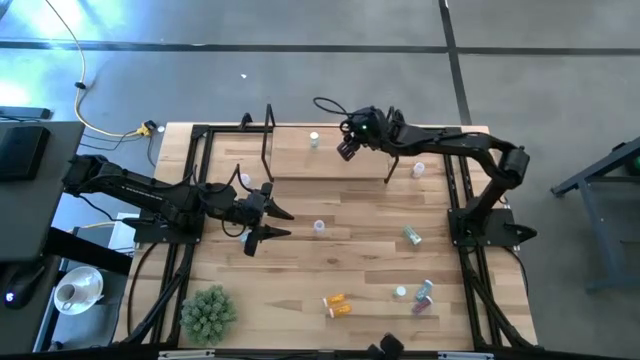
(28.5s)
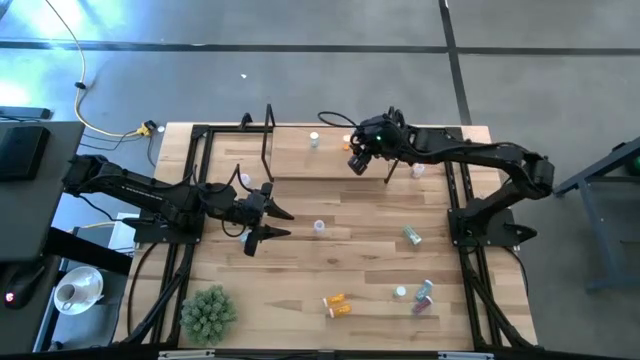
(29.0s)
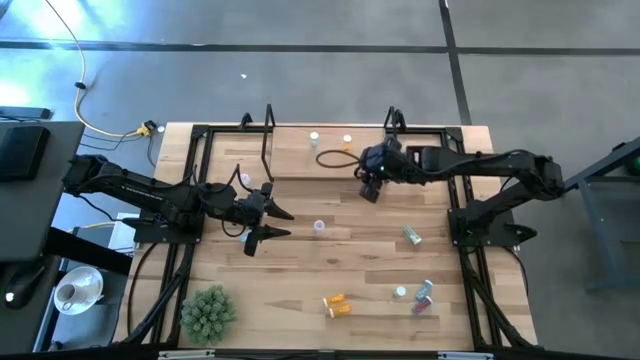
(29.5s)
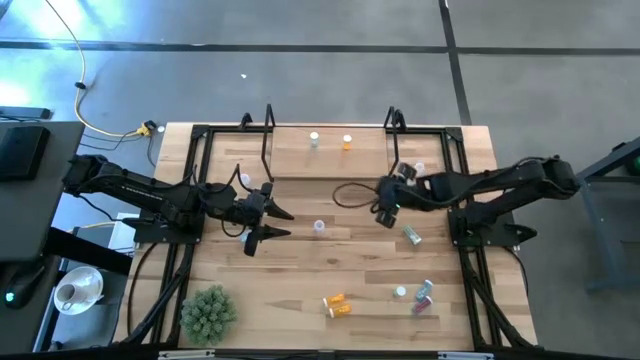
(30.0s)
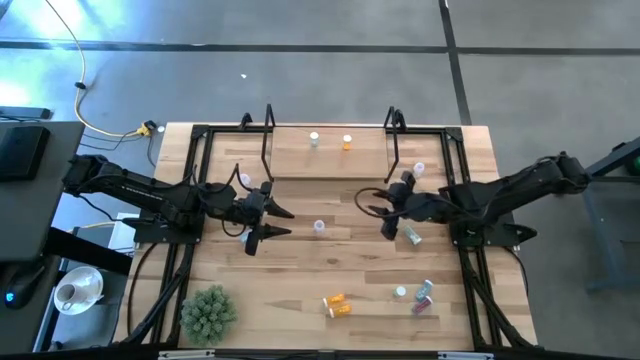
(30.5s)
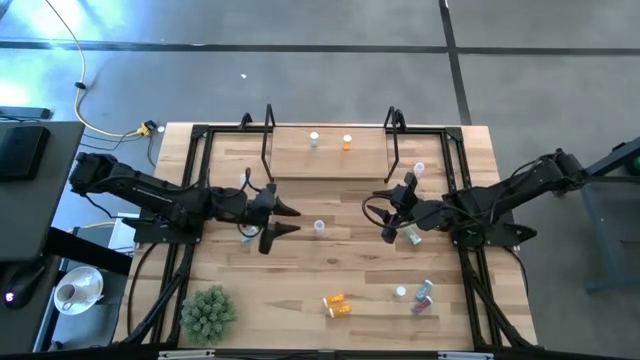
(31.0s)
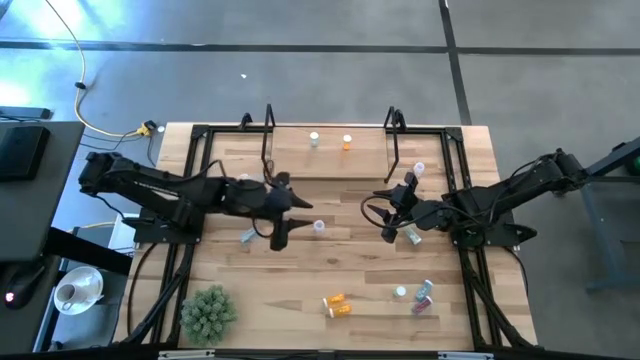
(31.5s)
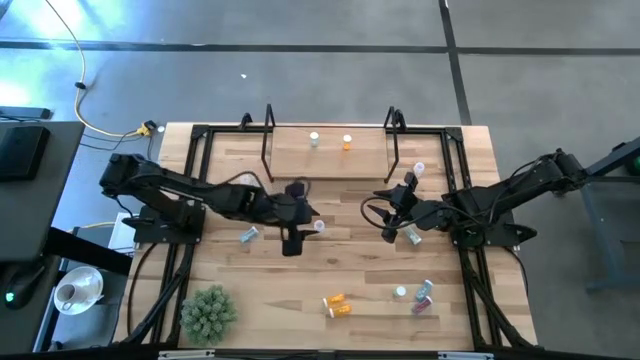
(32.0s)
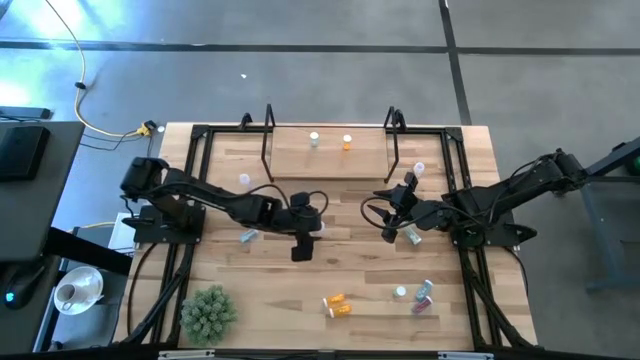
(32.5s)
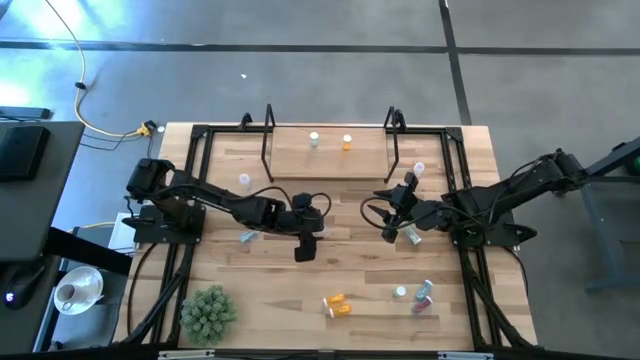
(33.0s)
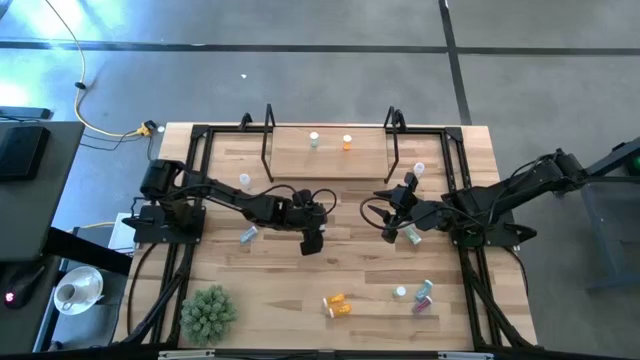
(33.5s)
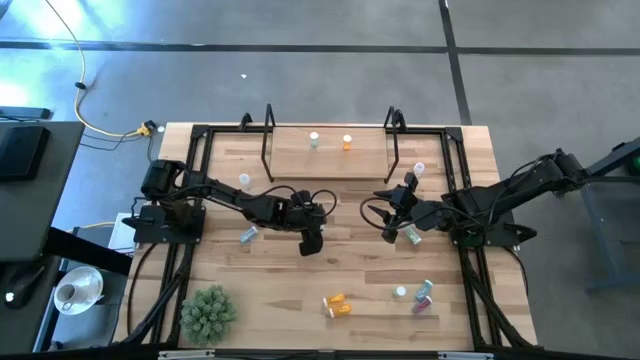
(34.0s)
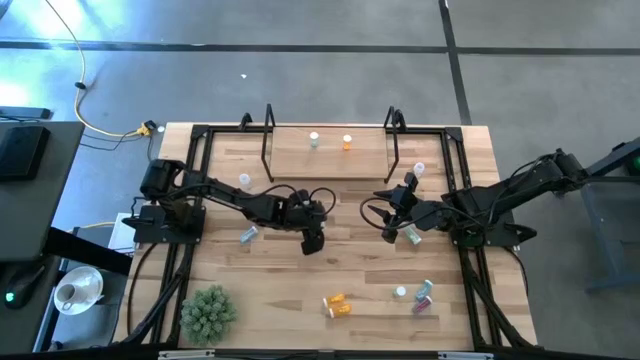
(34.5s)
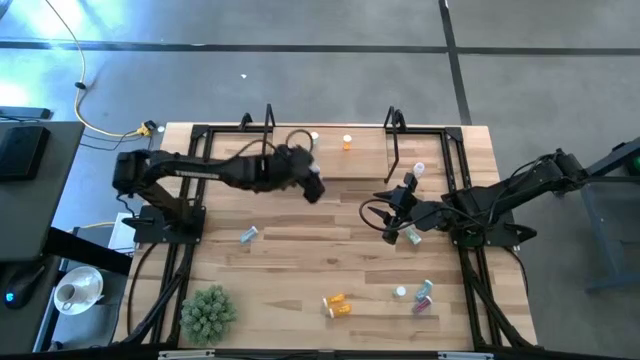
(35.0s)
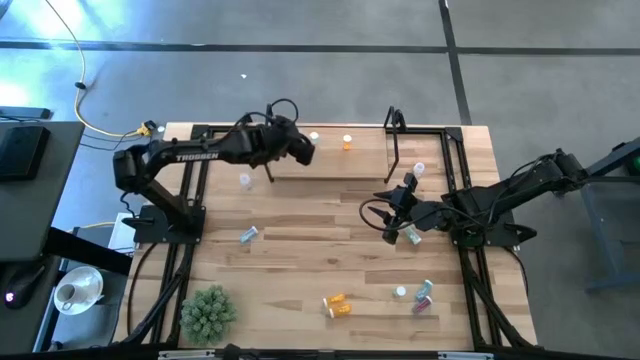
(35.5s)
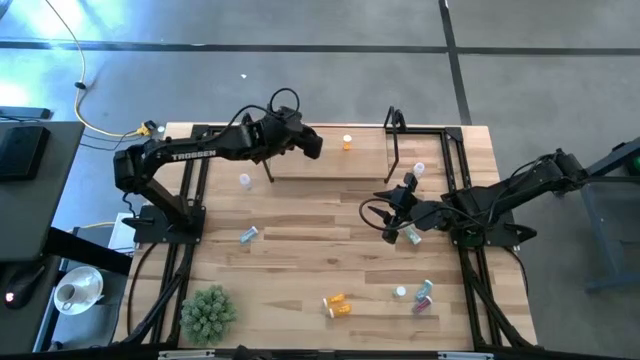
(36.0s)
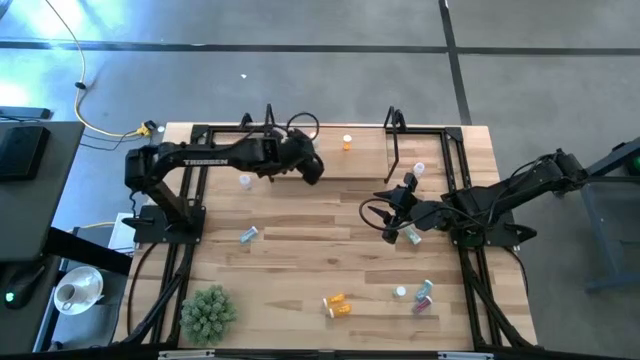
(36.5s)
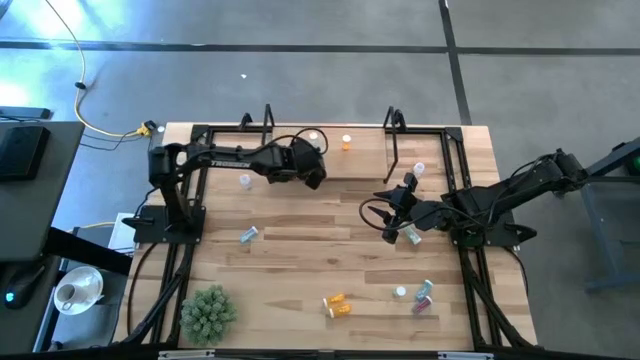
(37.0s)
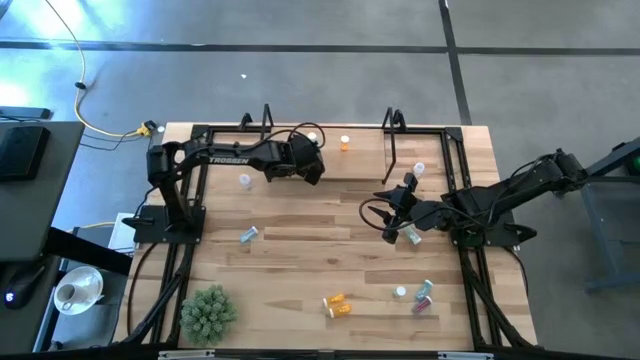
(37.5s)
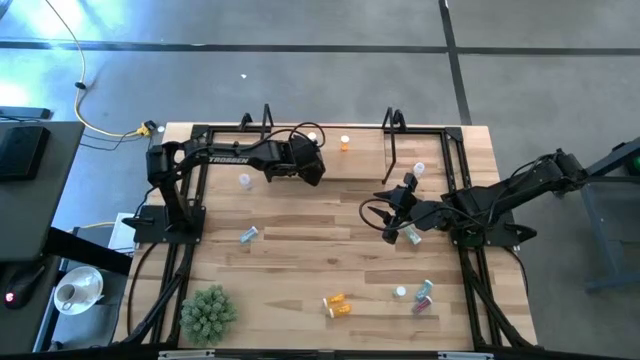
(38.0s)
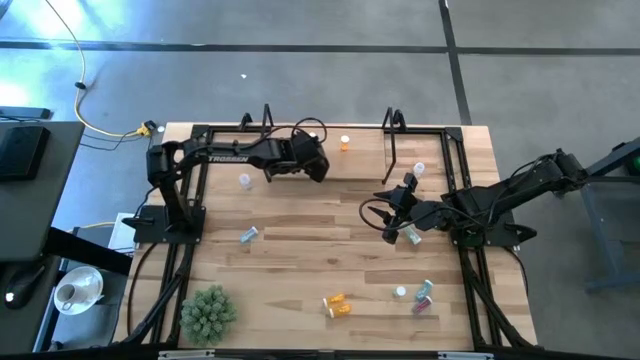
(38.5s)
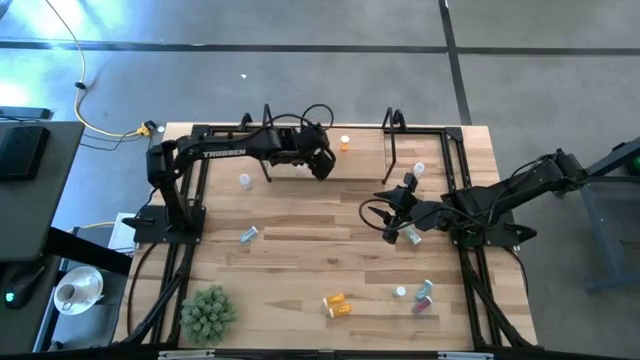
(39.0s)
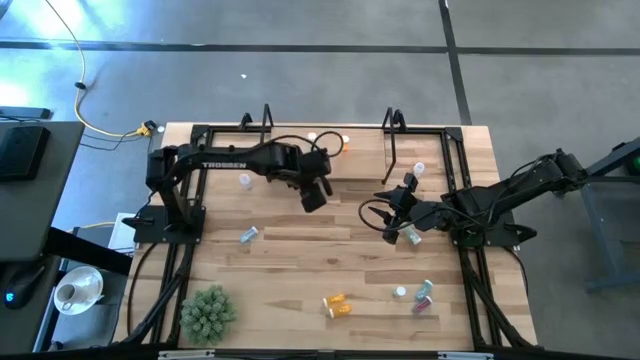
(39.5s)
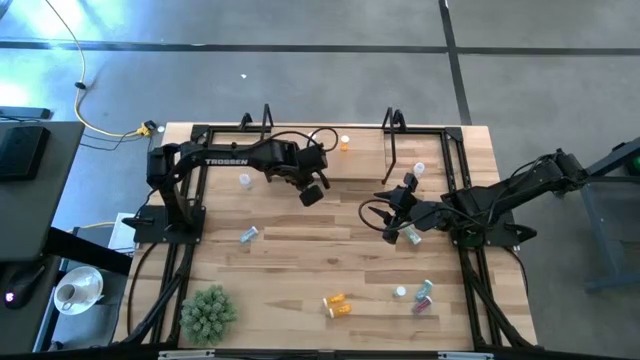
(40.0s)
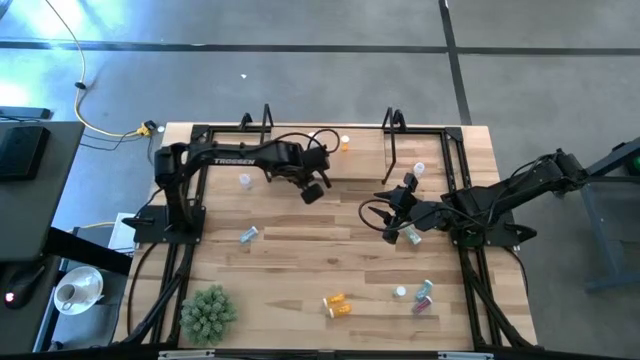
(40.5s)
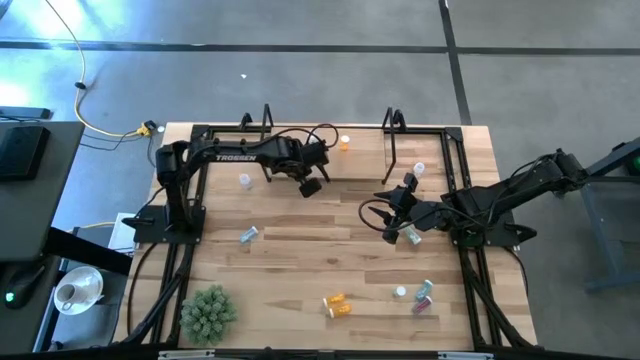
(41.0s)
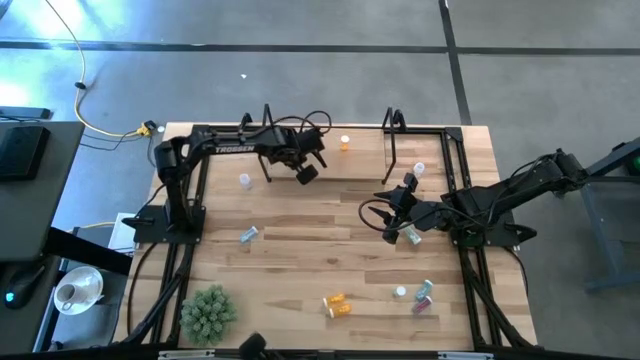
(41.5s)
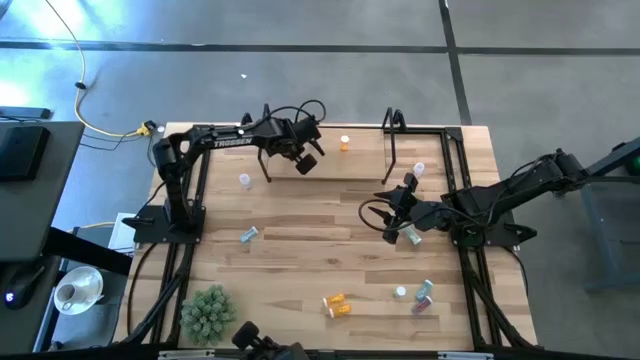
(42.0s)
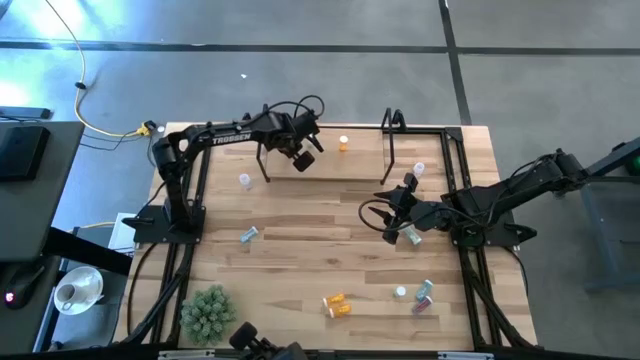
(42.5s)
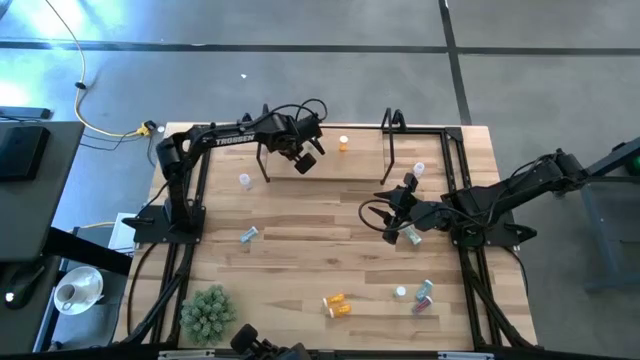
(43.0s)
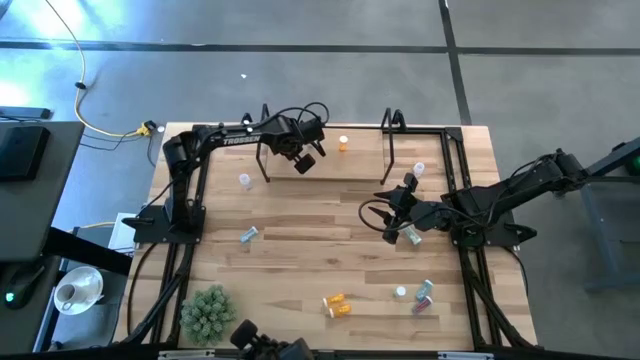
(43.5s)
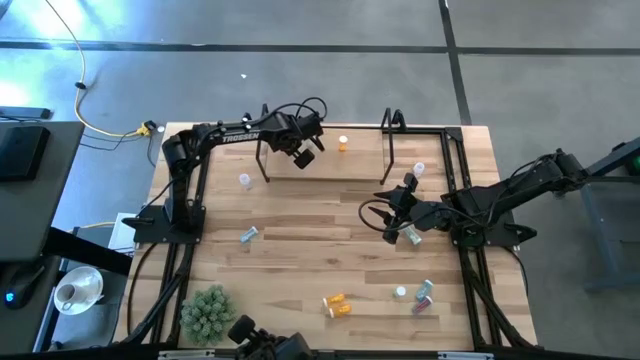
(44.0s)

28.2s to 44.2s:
Task: Pick and place medicine bottles onto shelf by color
Put the bottom white pill bottle on the shelf

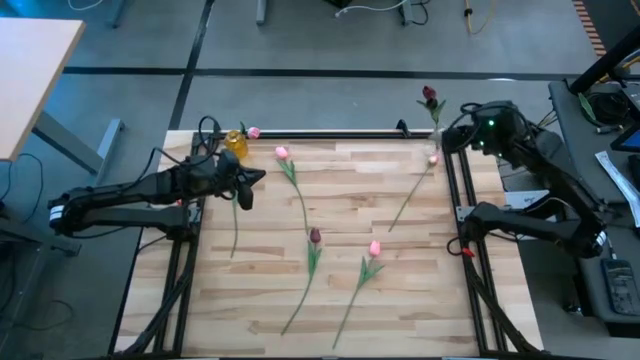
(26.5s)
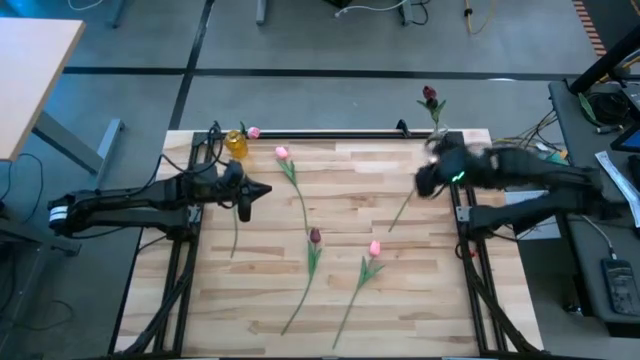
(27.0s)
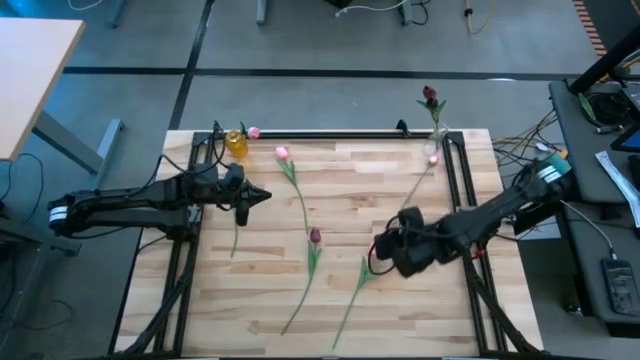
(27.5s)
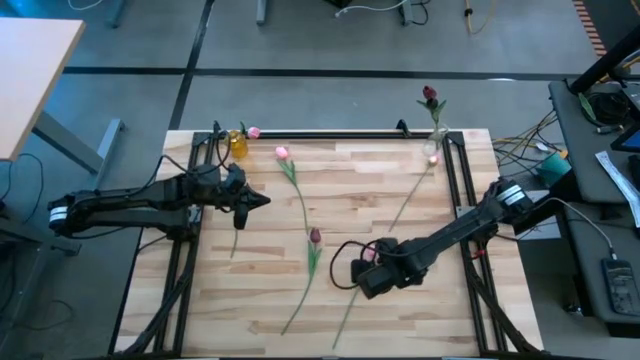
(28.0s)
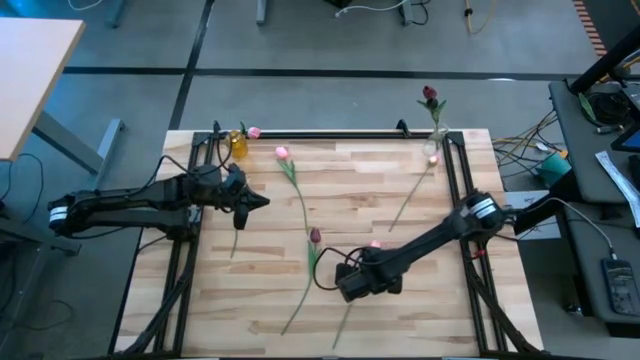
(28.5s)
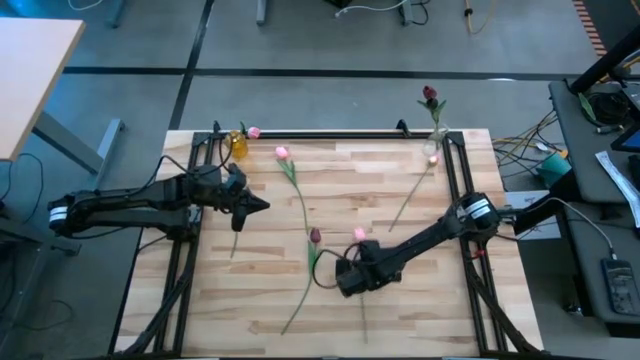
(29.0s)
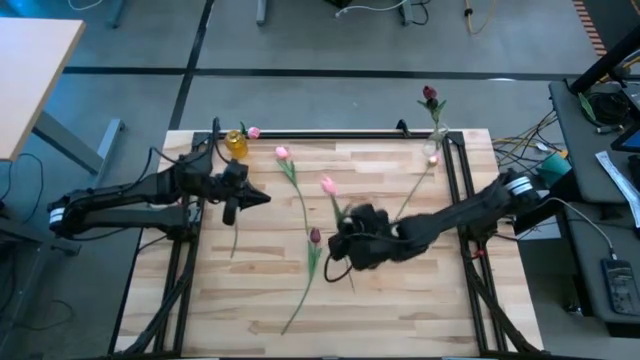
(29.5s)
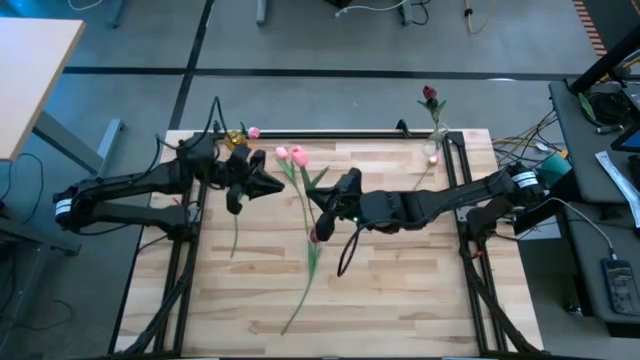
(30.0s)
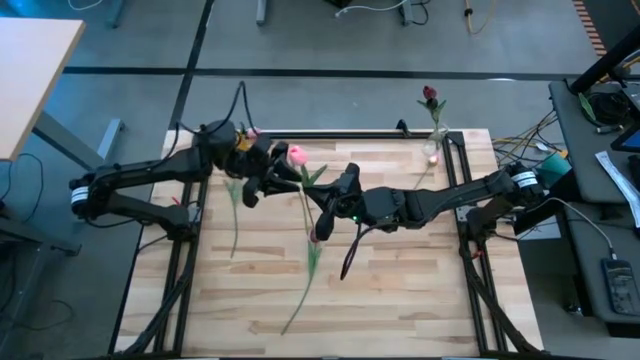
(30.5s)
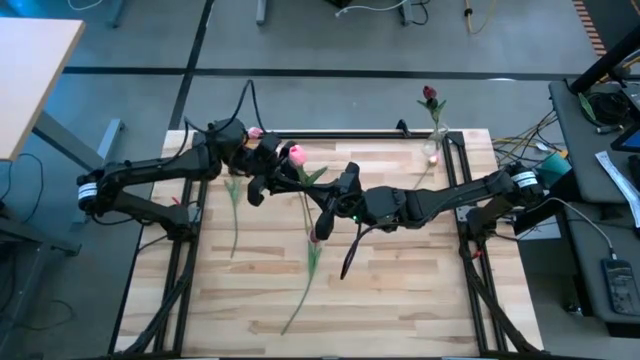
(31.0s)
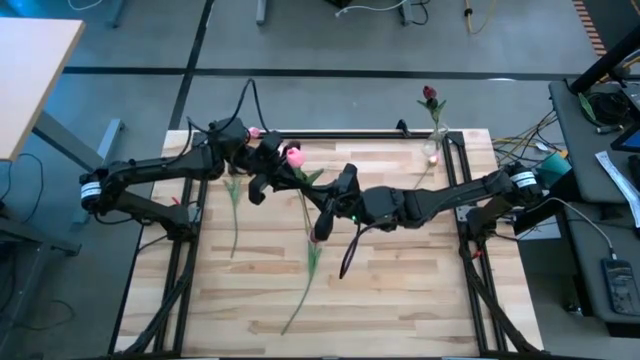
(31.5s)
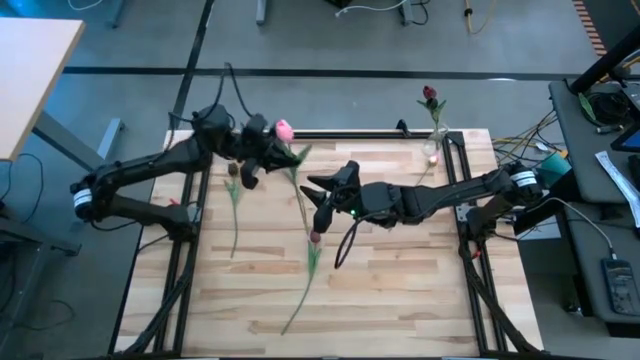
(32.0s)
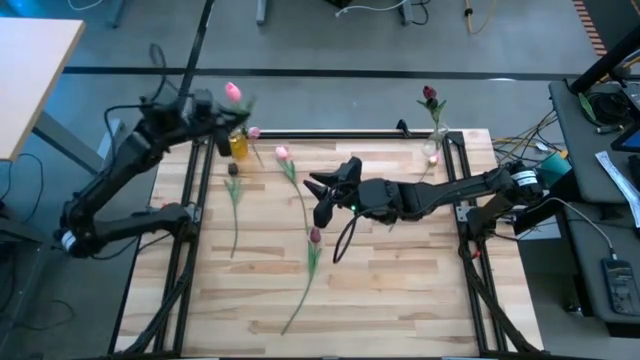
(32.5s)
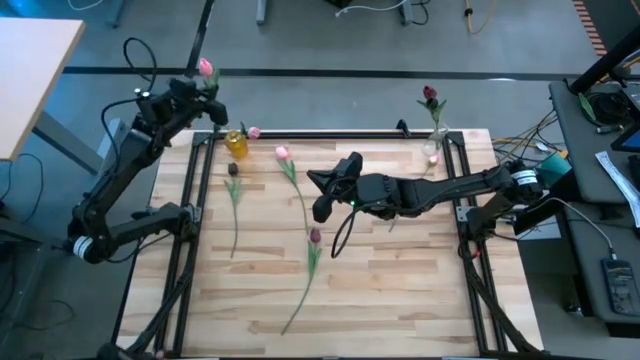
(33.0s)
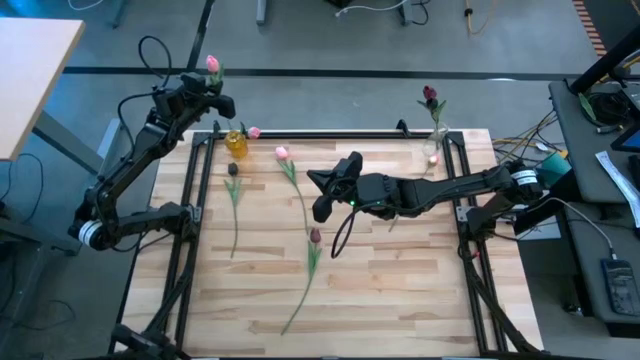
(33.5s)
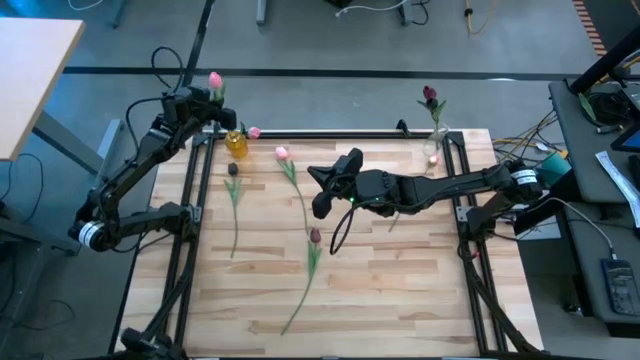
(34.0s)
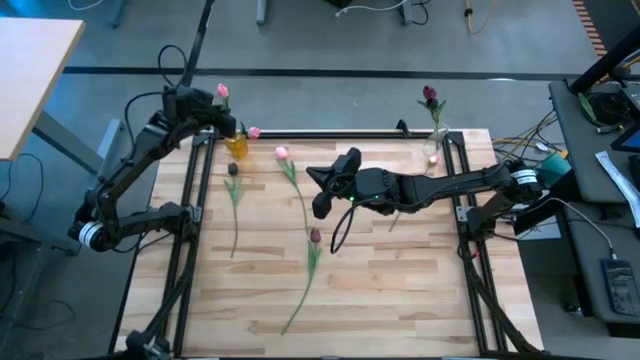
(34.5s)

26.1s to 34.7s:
Task: Sort flowers into vase by color
Put the pink tulip into the yellow vase
